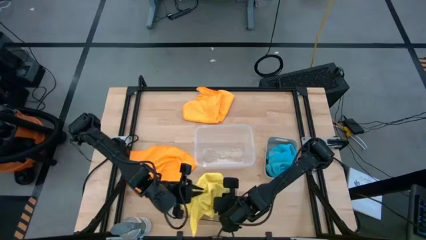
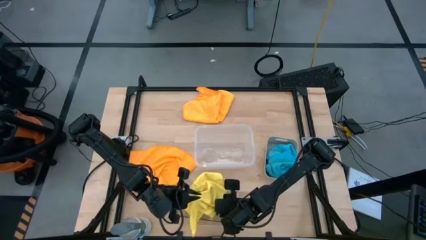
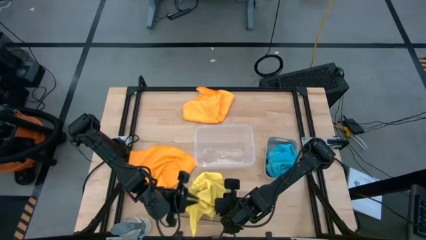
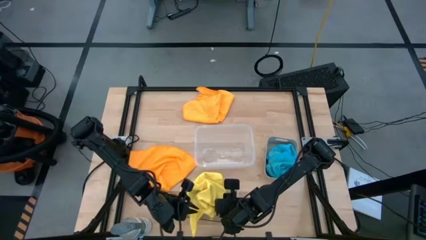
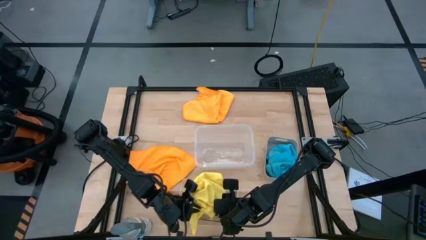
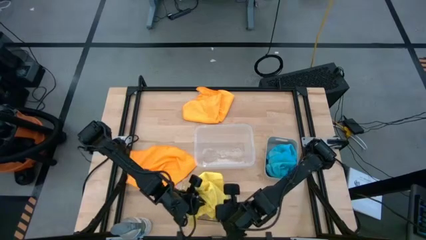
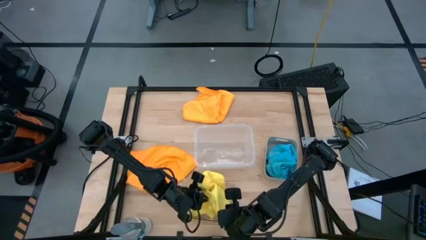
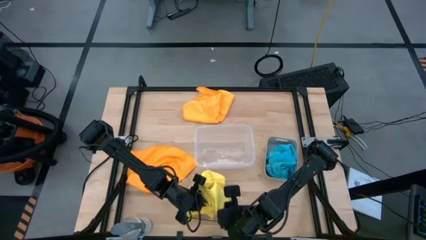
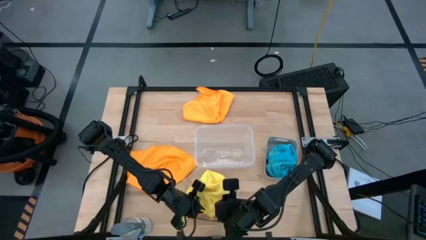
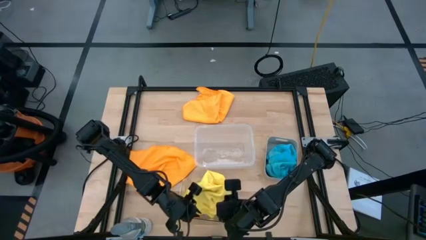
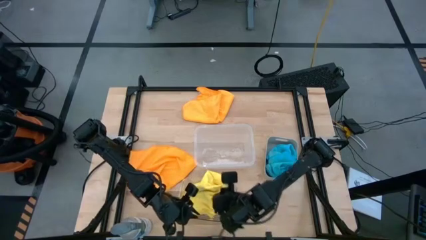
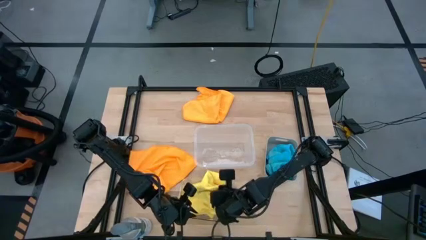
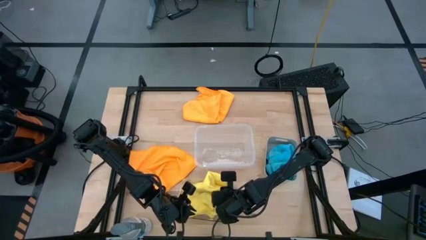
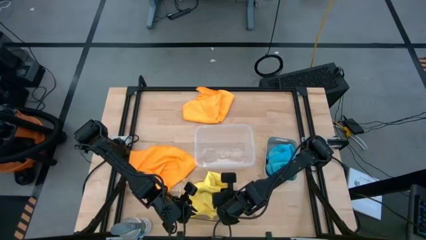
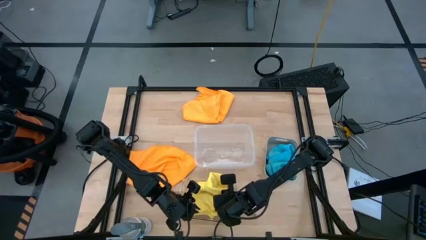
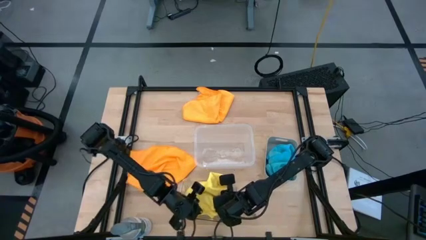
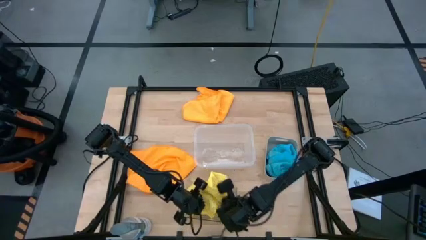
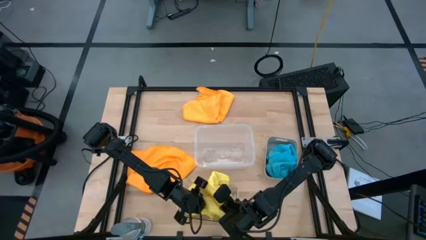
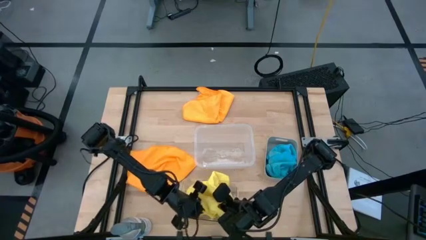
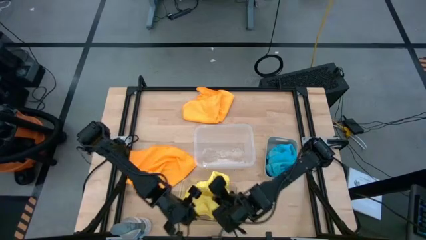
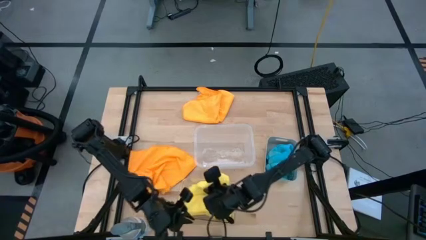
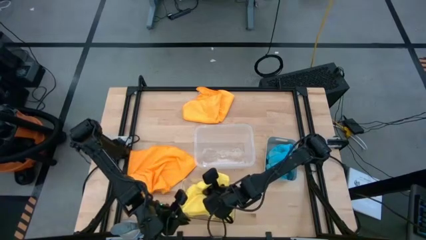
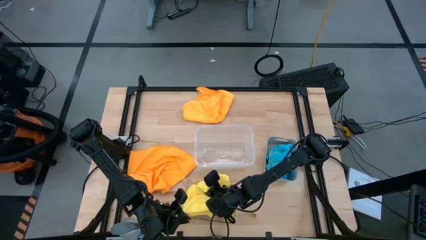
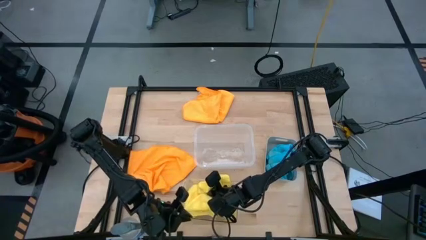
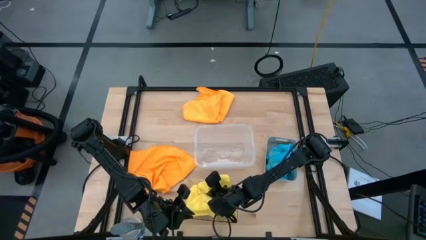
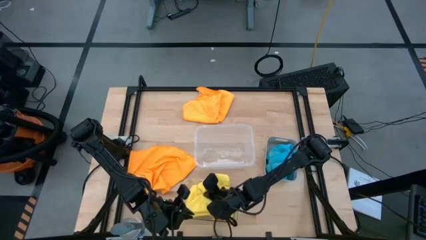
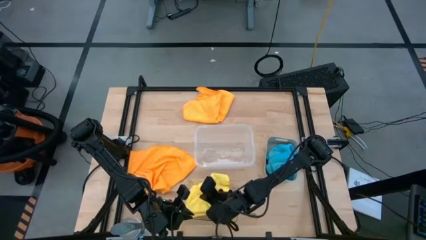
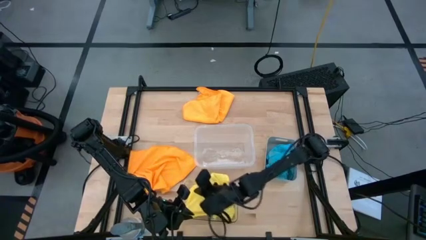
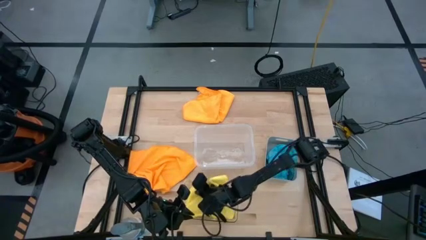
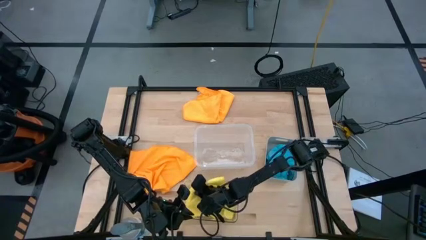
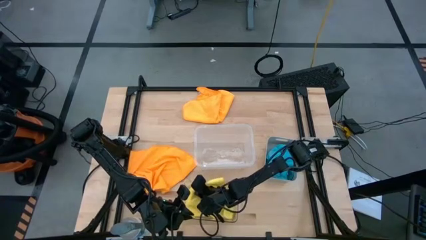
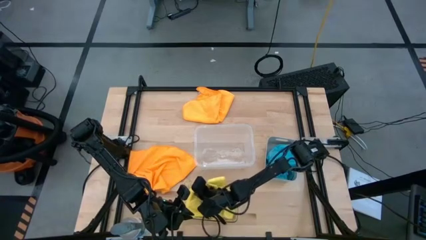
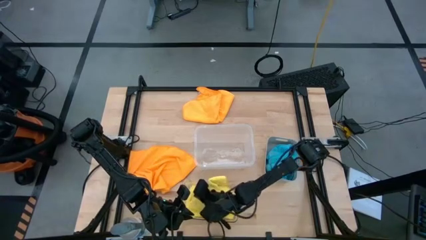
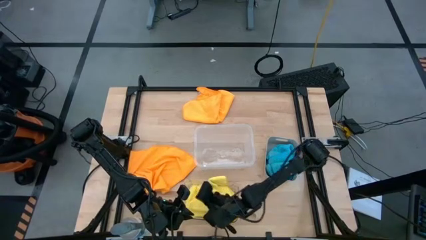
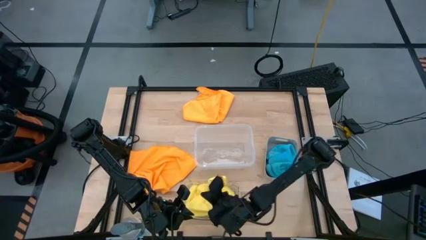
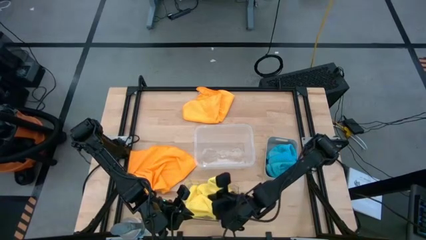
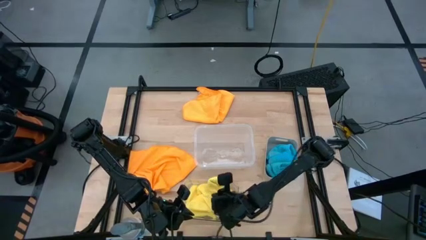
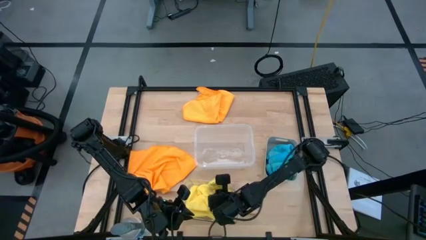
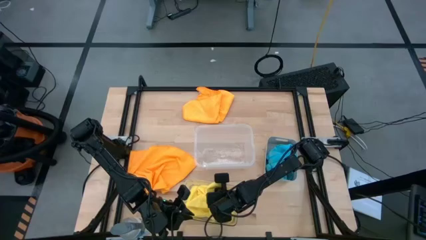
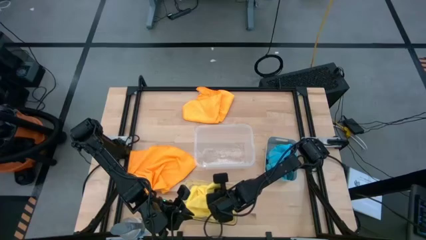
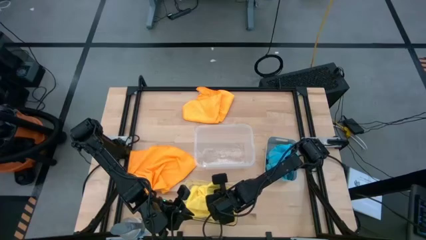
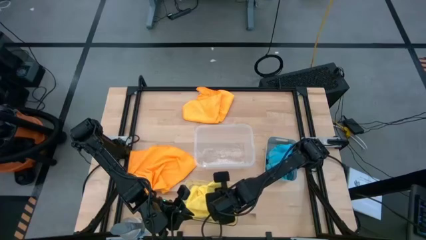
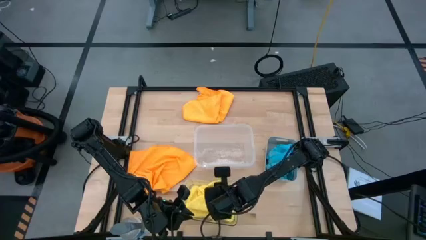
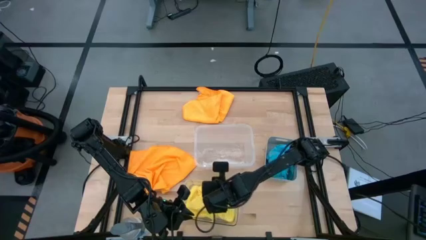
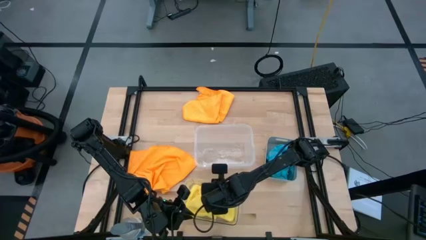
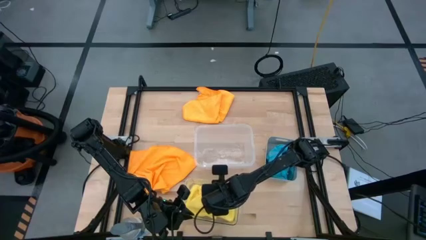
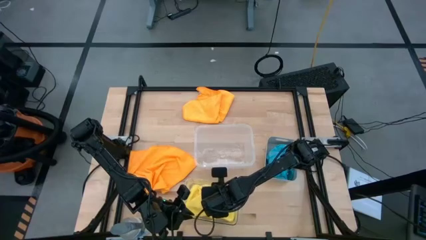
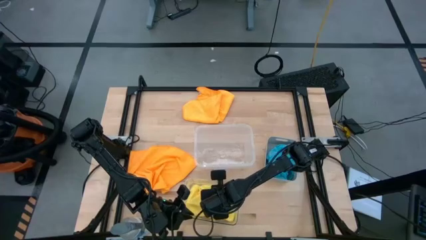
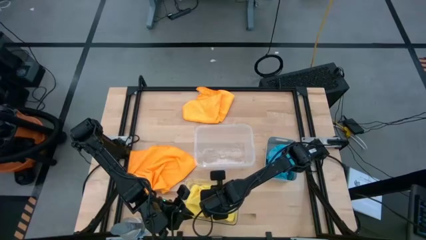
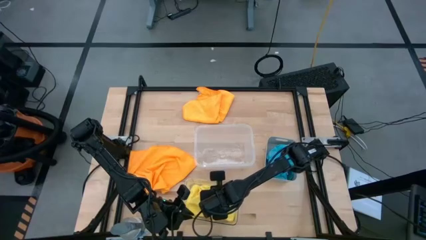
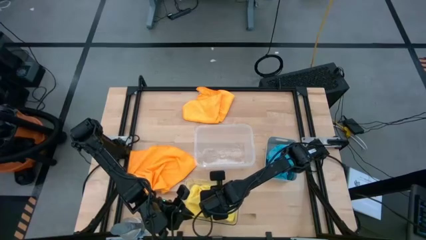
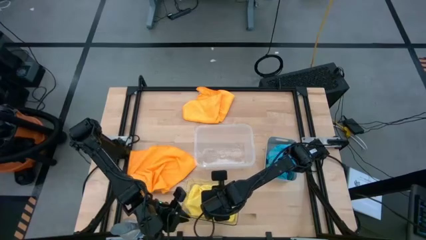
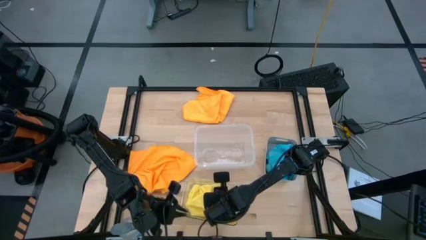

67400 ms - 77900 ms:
Task: Sort microfiber towel by color & place in baskets
Put the yellow microfiber cloth into the transparent bin

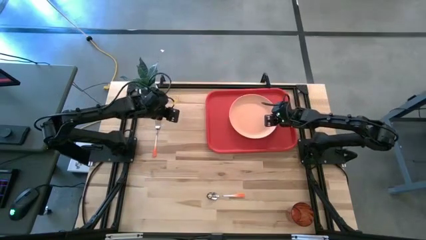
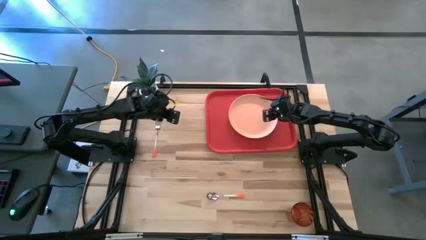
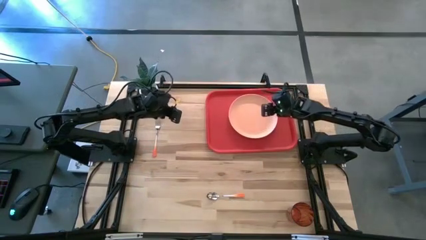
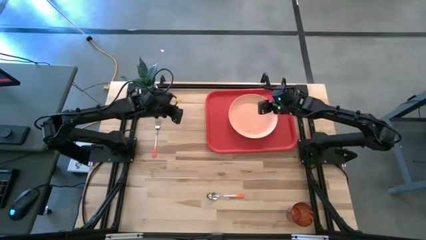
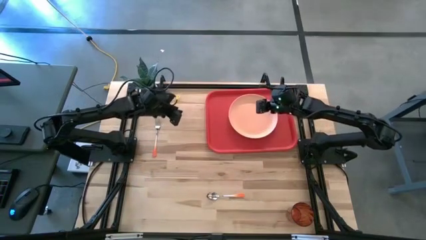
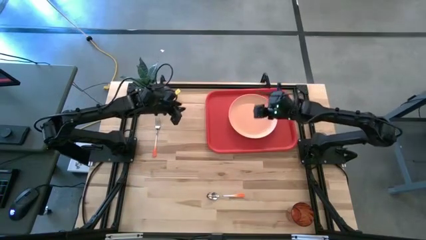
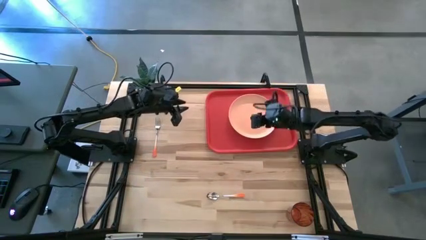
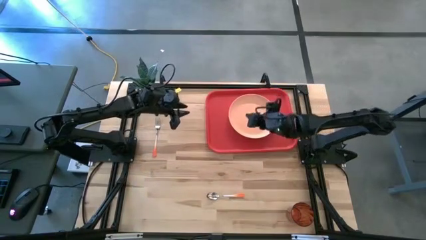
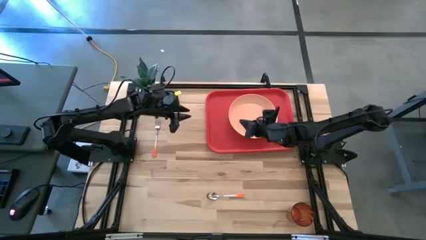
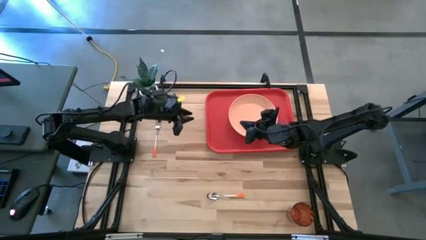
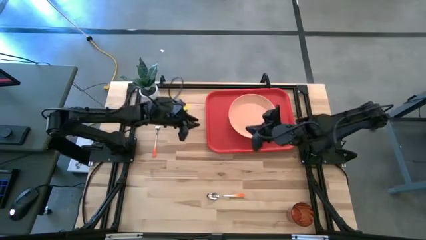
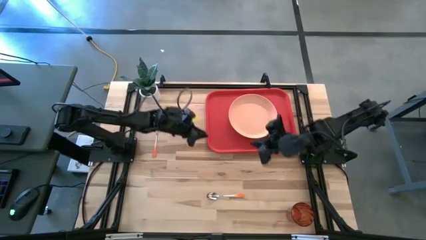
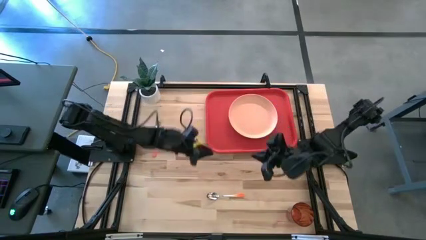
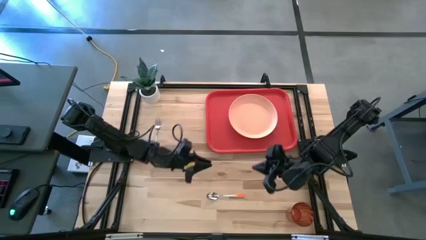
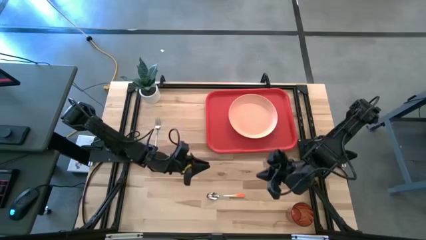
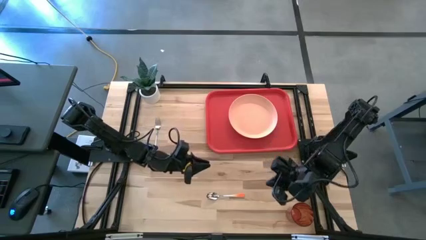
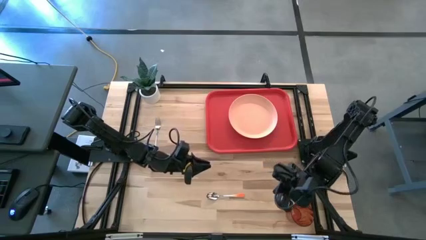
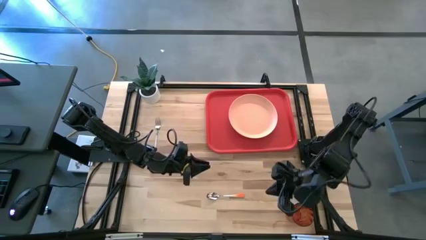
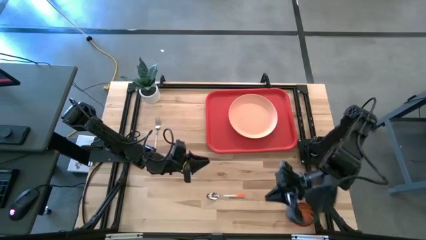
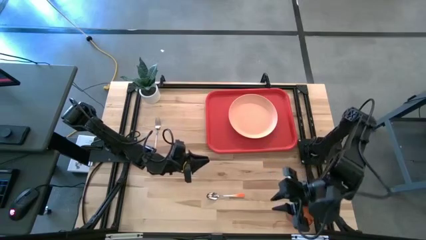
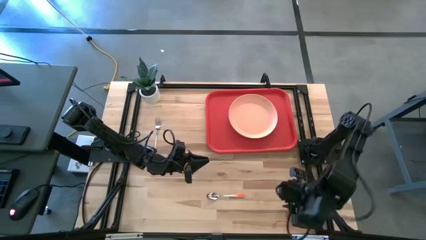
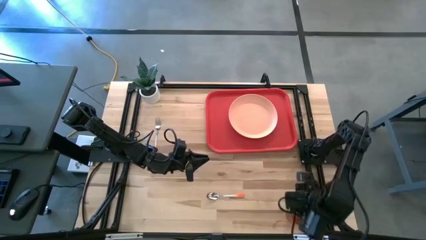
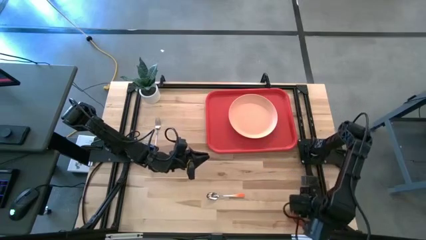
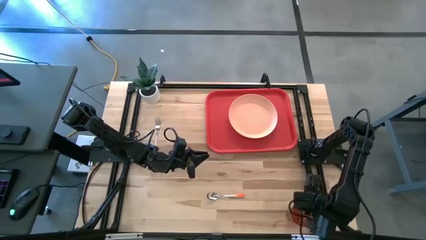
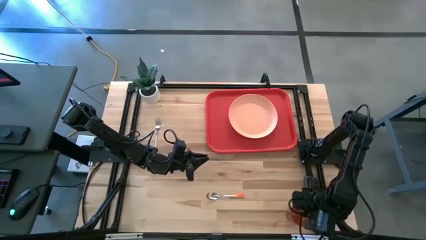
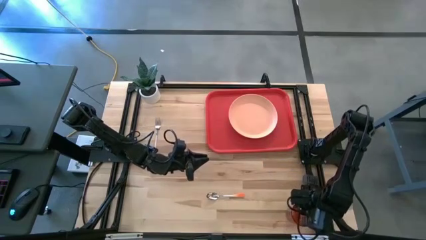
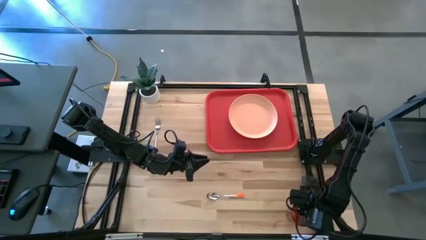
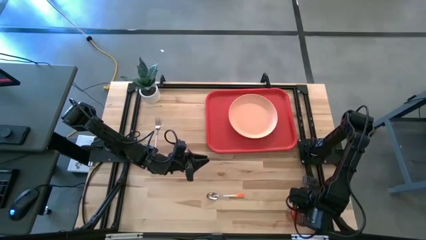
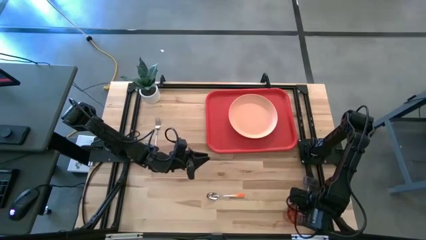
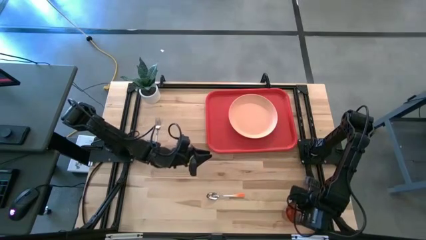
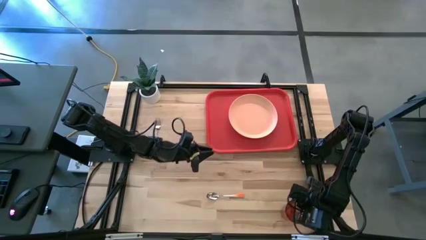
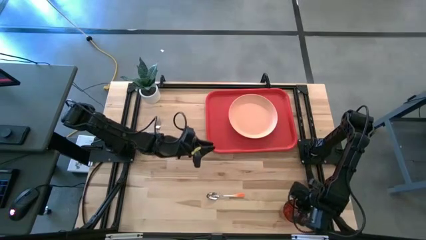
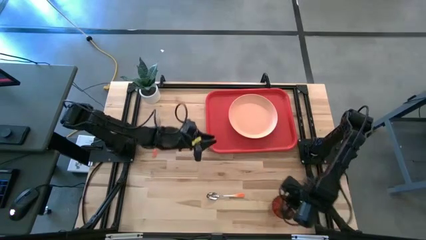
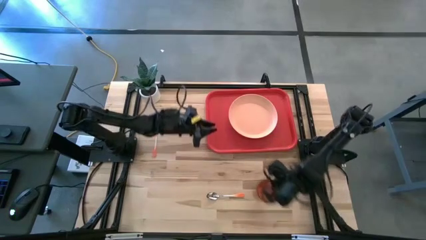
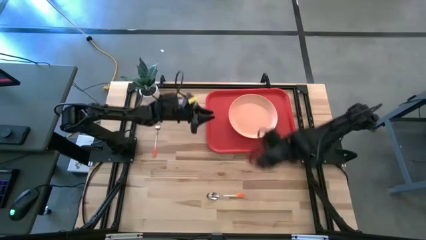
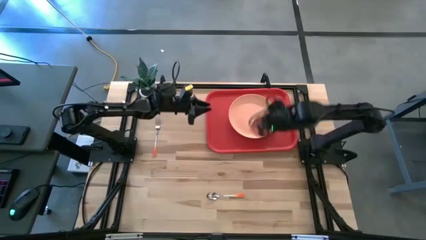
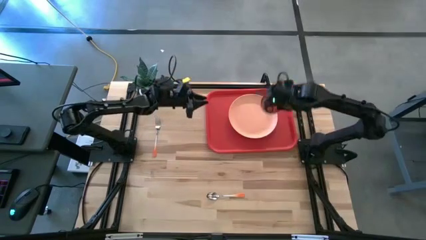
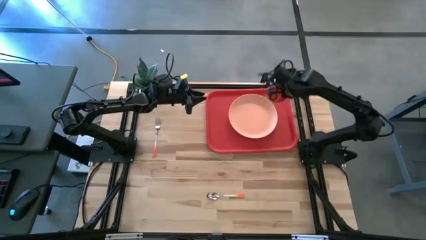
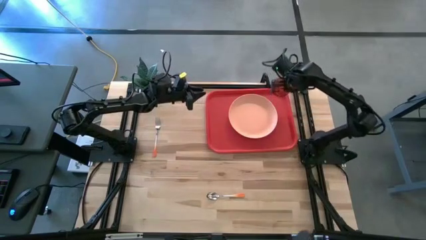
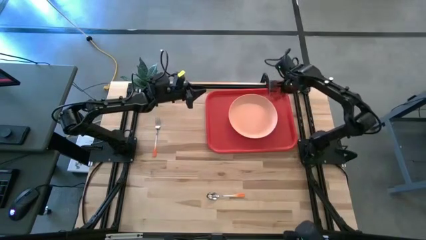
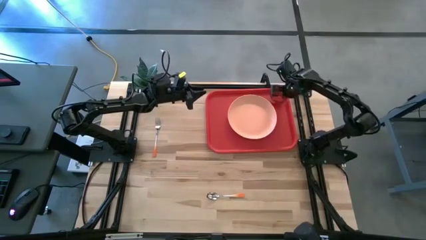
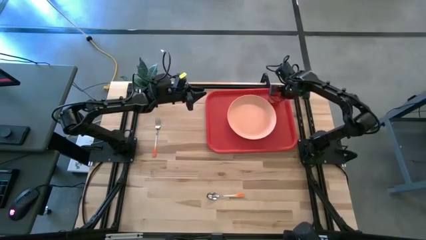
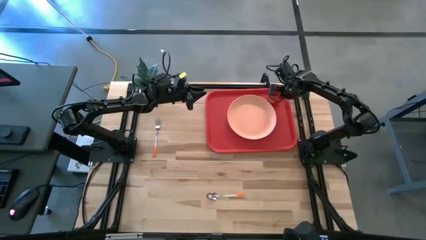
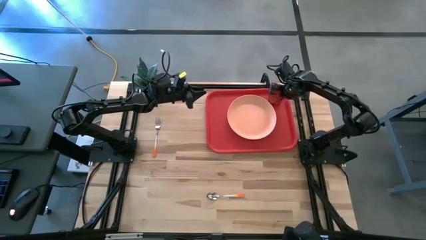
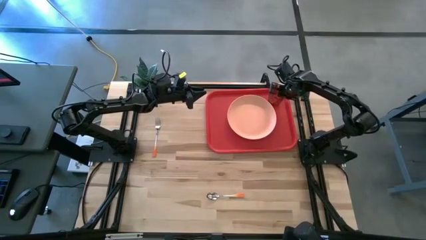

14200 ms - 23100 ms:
Task: Pick and place plate/cup/fork/spoon on tray
Put the orange cup on the red tray to the top right of the light pink plate
